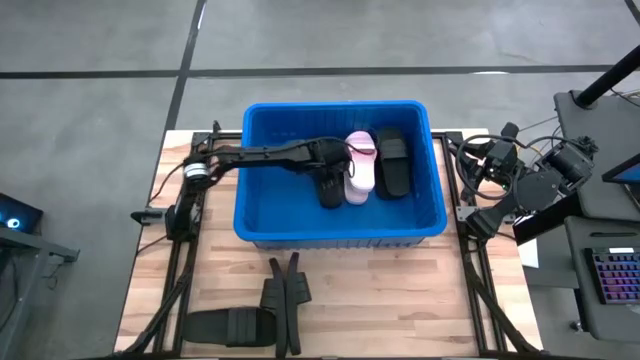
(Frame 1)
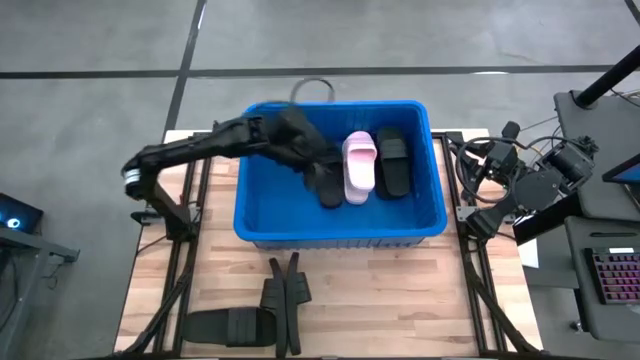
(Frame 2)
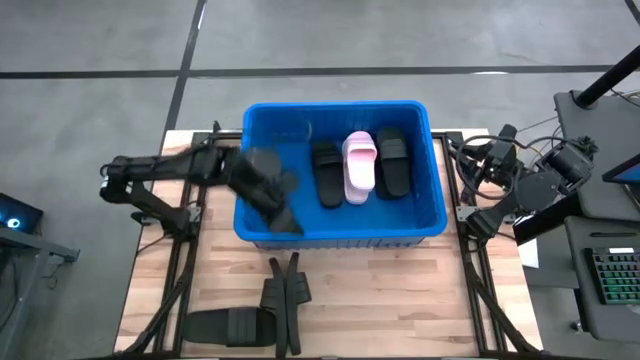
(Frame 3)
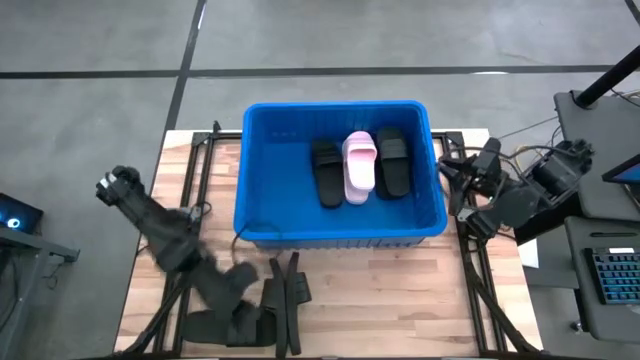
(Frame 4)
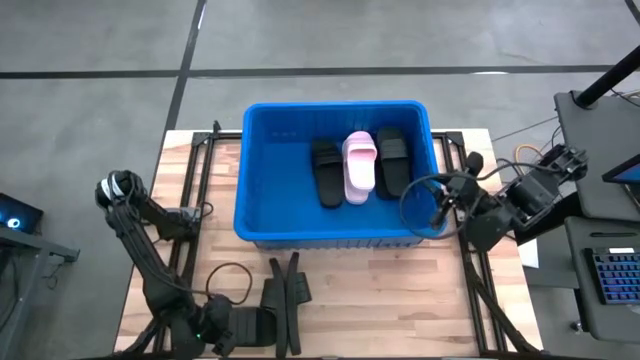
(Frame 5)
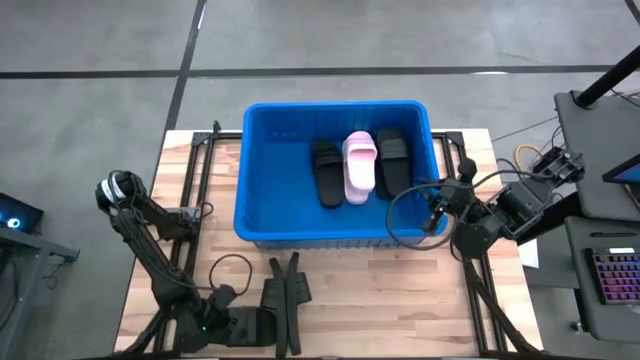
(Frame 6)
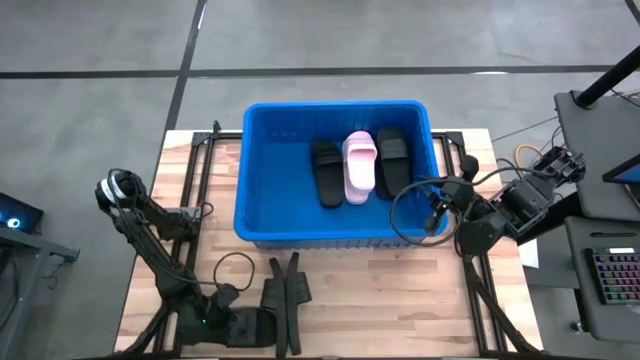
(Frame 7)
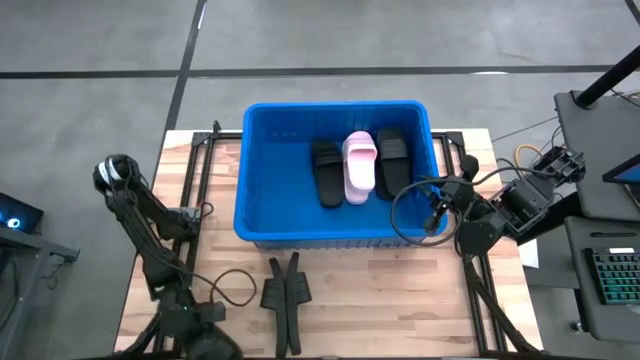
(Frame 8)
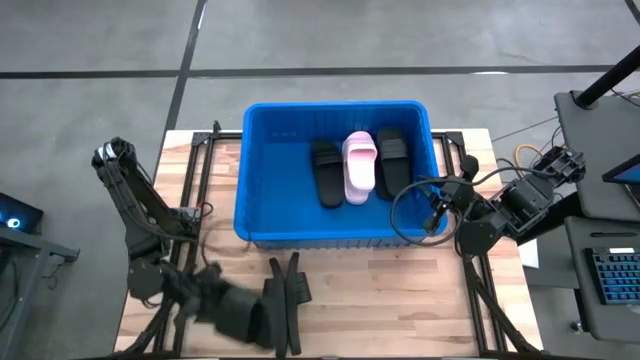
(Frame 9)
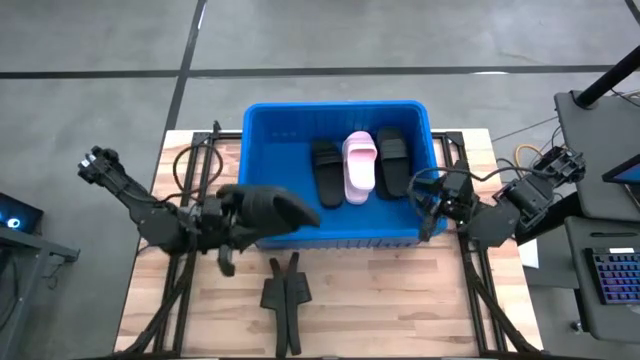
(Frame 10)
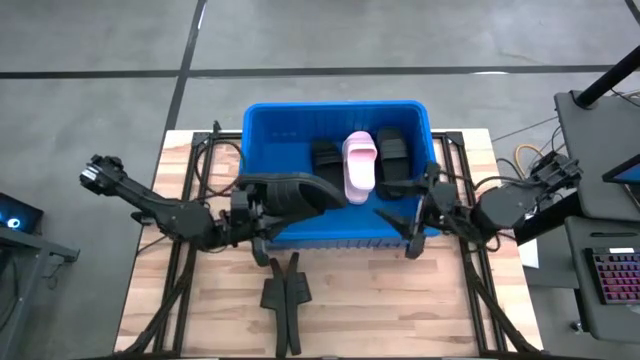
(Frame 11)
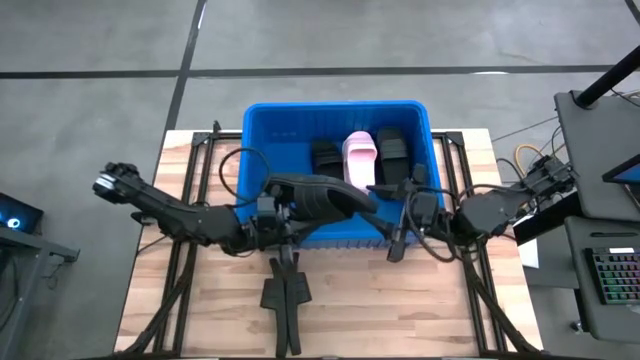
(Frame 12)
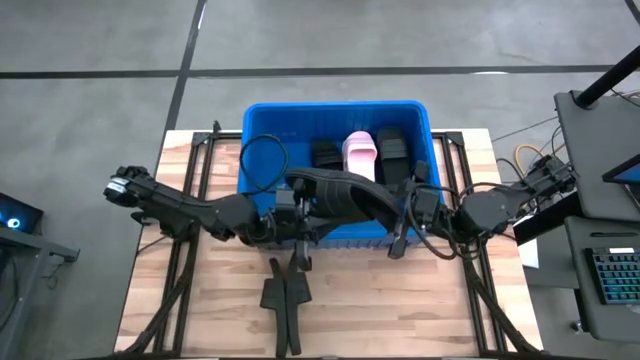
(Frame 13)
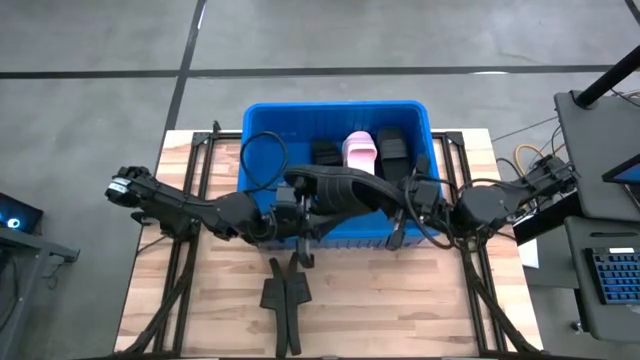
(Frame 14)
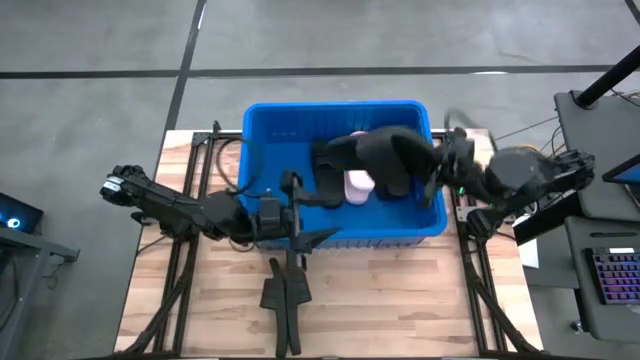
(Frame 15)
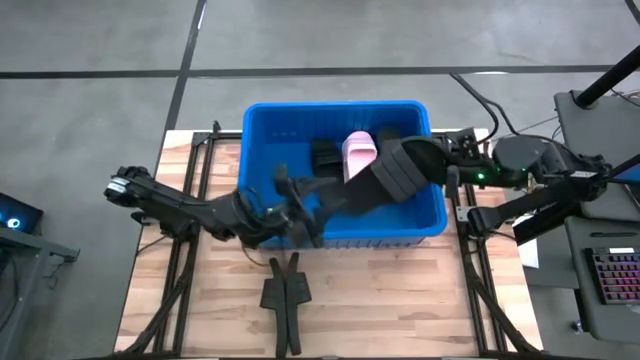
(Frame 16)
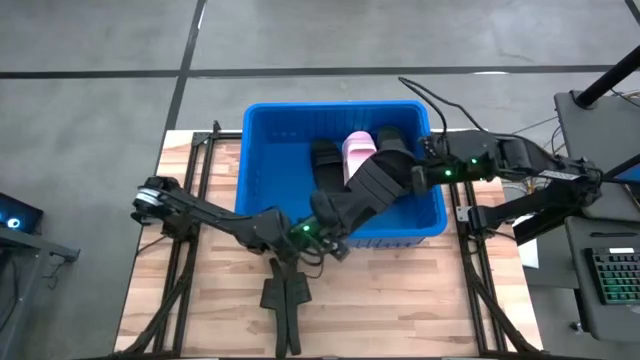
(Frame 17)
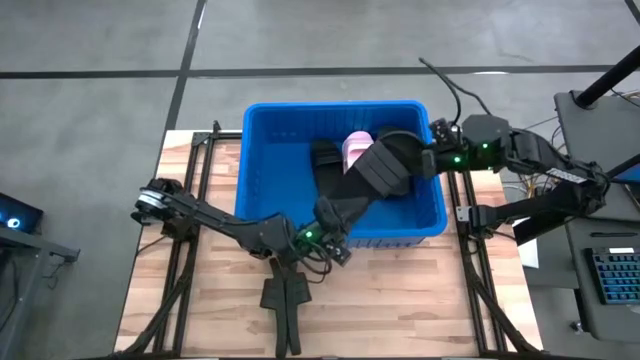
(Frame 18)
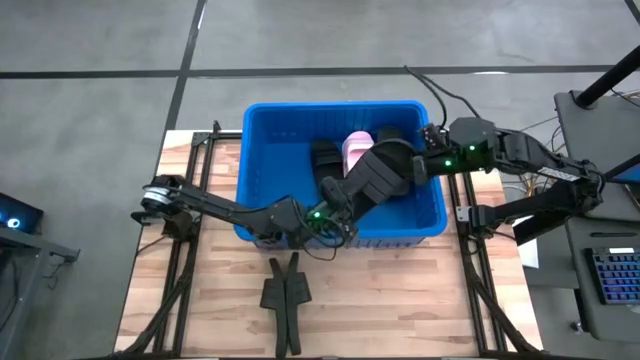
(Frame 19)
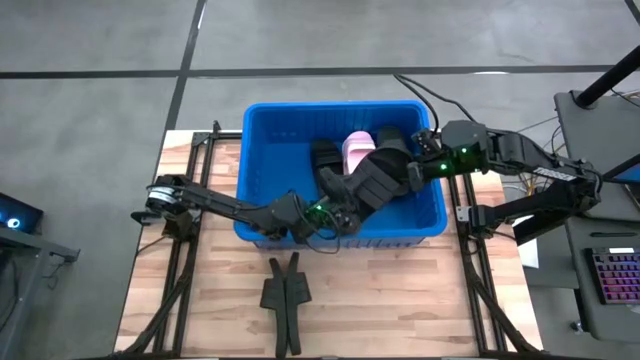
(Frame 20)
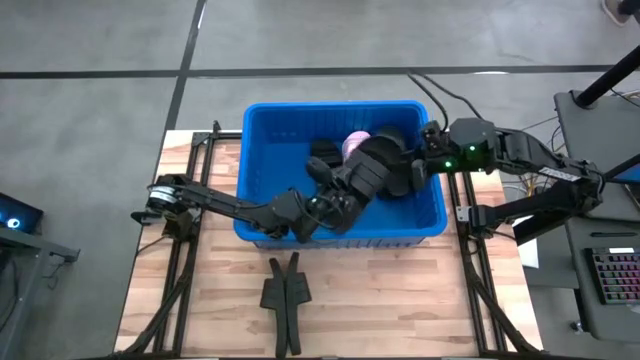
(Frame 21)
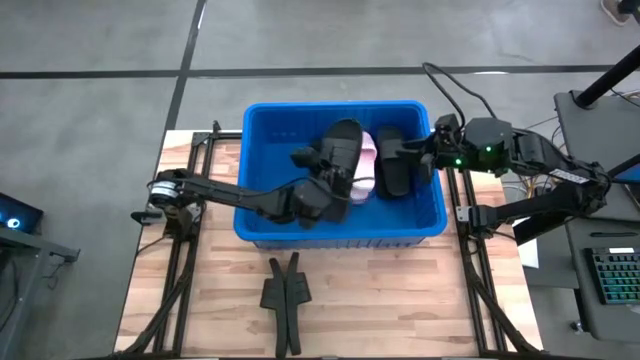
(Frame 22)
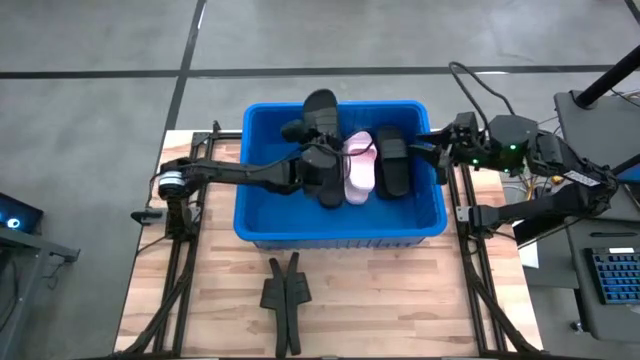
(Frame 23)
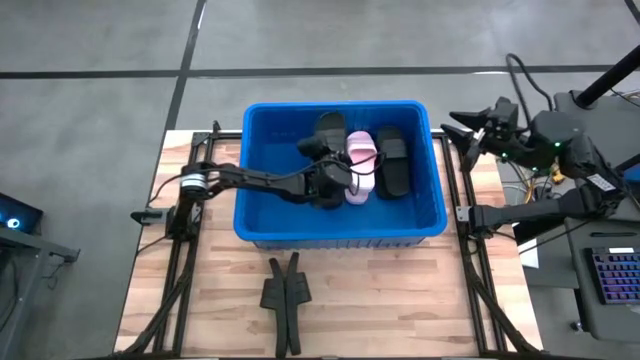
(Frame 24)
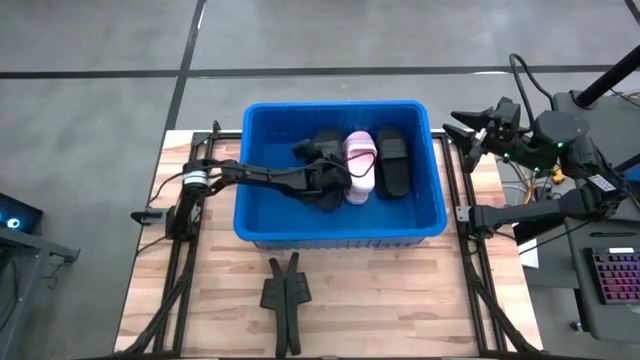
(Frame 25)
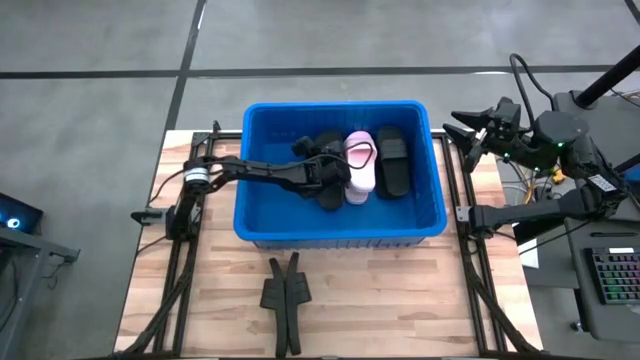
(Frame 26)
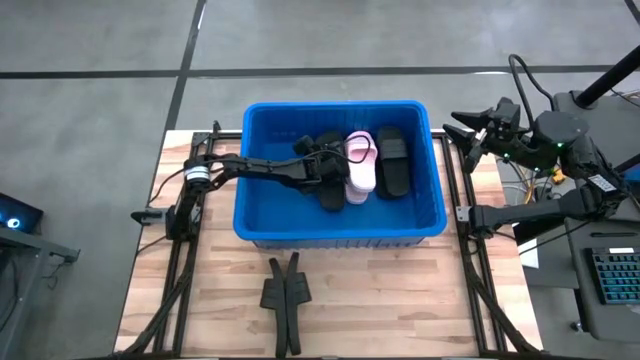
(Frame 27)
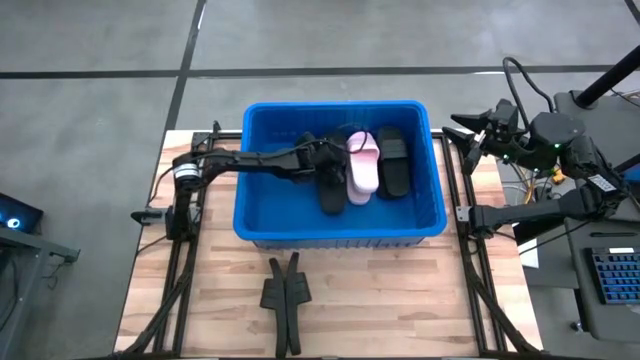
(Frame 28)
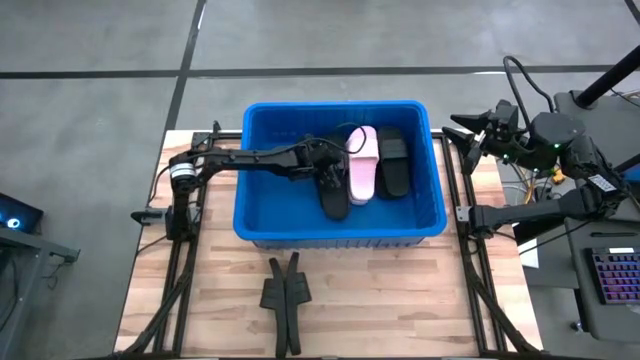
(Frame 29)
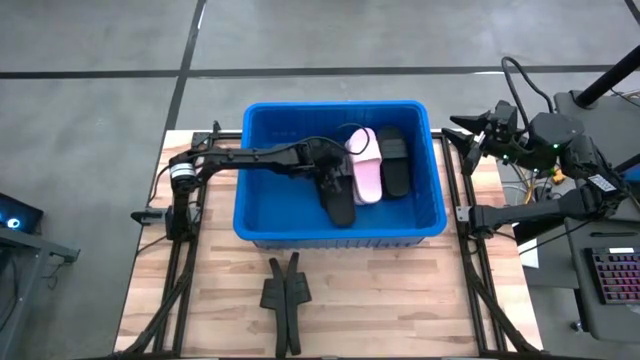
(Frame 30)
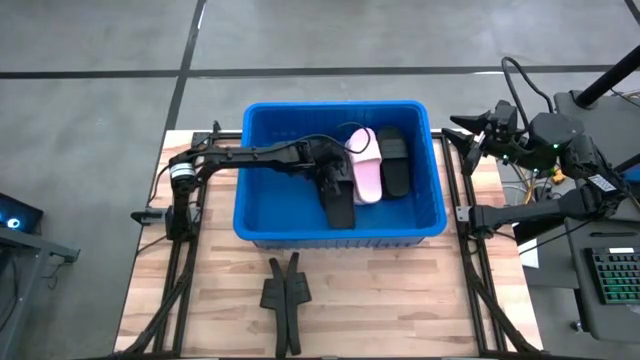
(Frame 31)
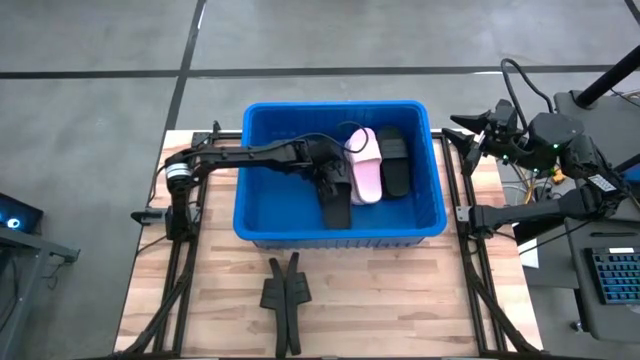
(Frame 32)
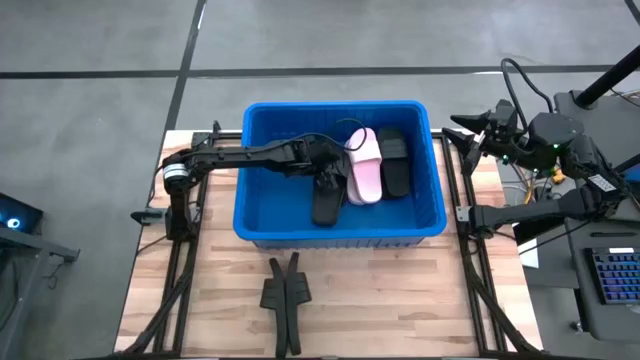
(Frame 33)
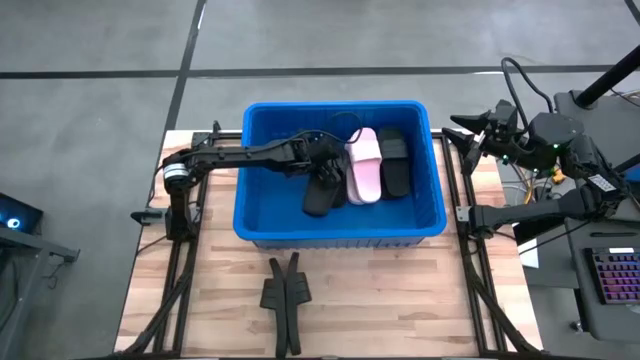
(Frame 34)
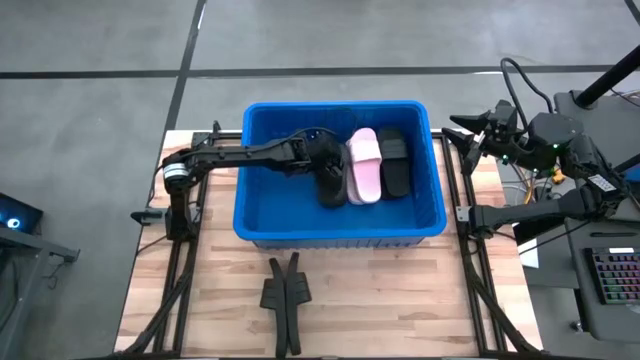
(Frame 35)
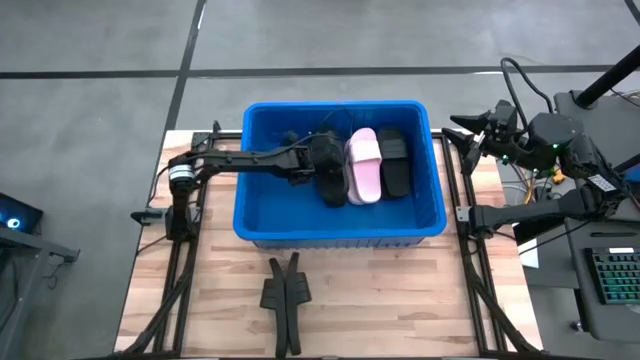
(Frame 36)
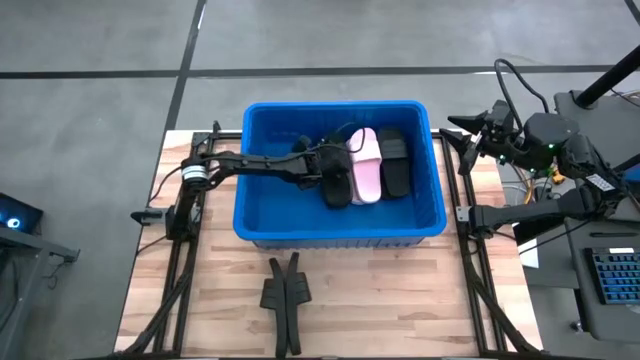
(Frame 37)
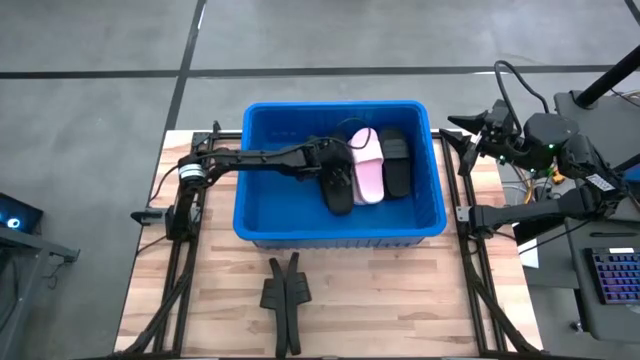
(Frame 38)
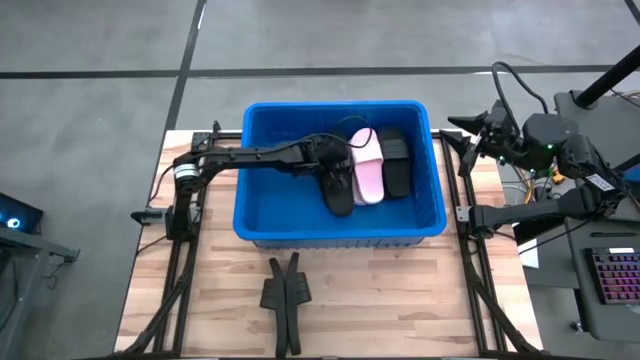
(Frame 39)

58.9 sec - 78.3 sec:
Task: Pick and place slides into bin
Put the black slide into the blue bin
